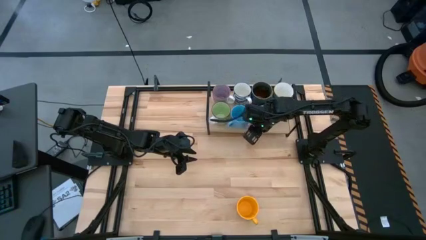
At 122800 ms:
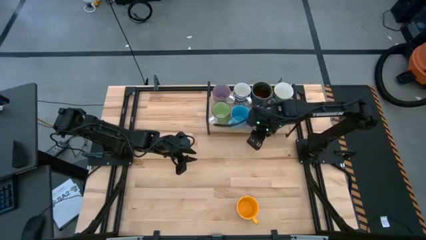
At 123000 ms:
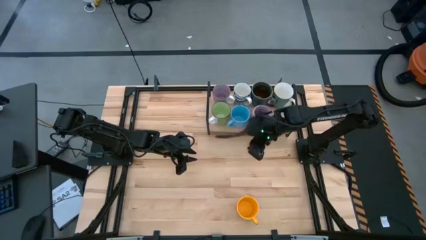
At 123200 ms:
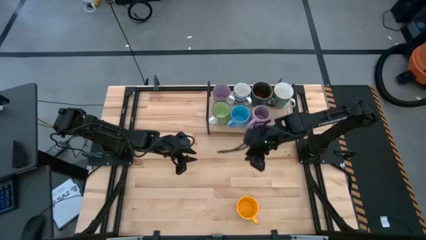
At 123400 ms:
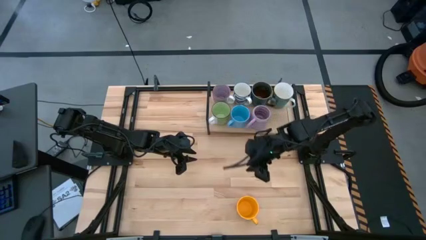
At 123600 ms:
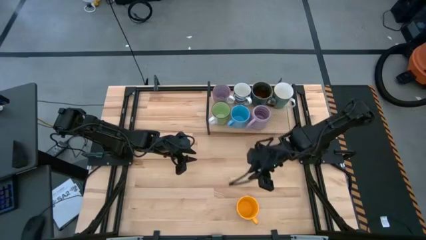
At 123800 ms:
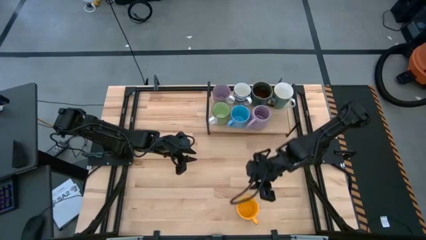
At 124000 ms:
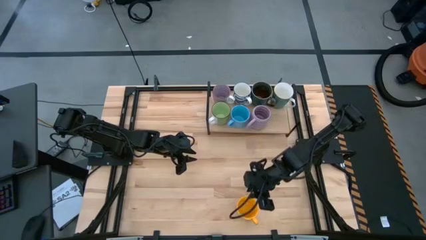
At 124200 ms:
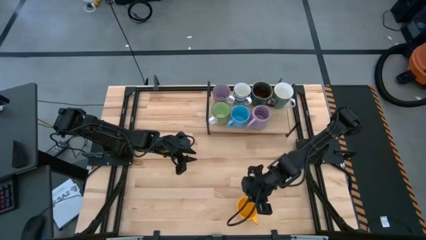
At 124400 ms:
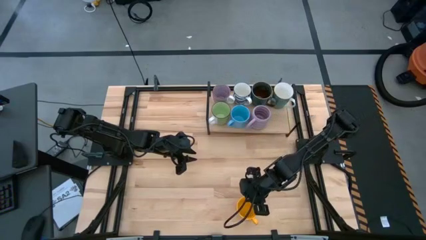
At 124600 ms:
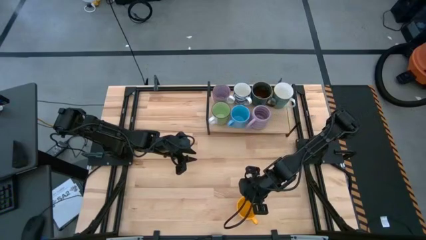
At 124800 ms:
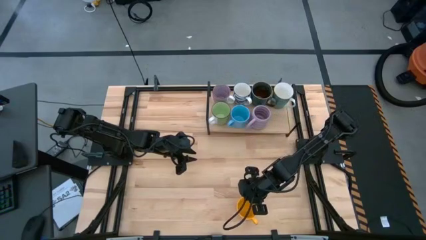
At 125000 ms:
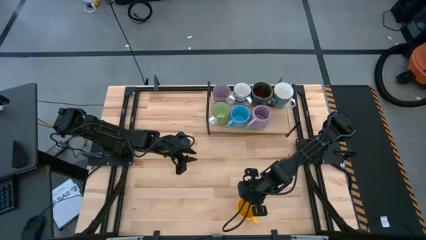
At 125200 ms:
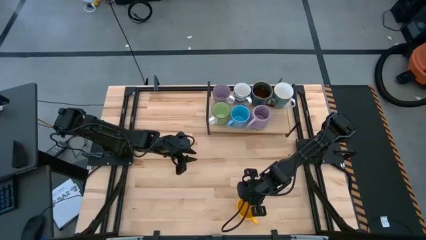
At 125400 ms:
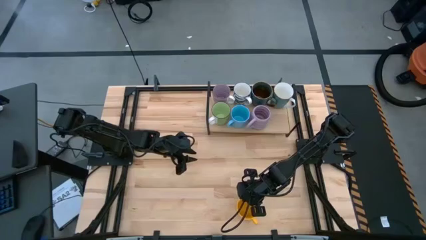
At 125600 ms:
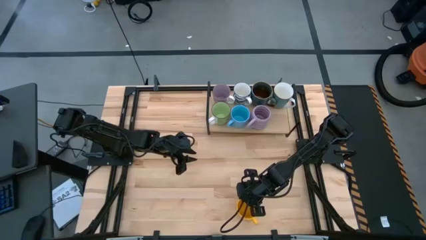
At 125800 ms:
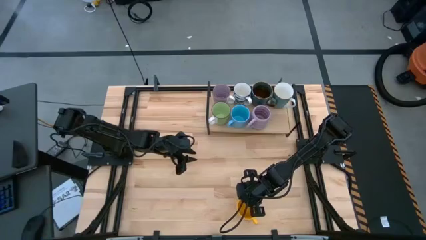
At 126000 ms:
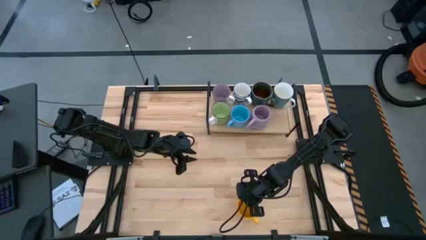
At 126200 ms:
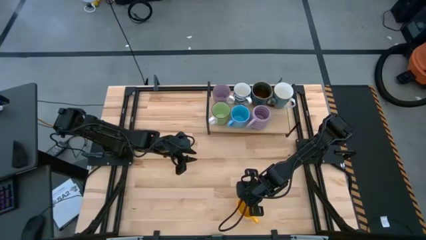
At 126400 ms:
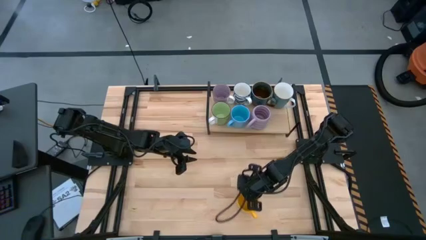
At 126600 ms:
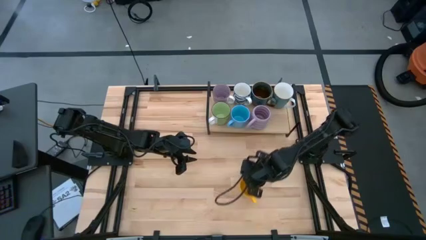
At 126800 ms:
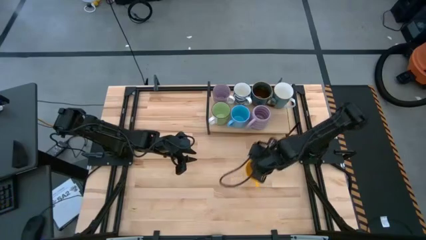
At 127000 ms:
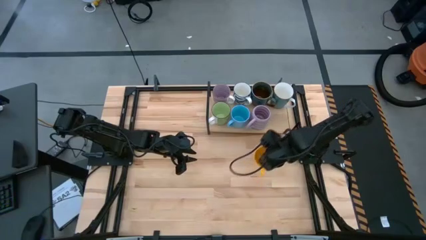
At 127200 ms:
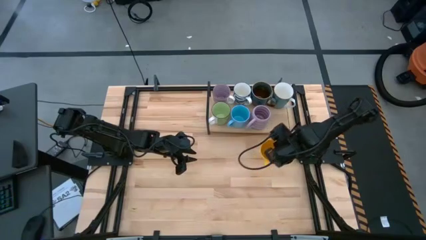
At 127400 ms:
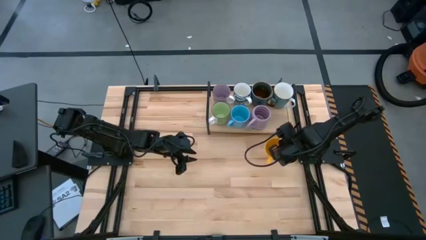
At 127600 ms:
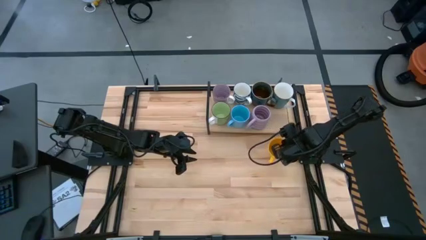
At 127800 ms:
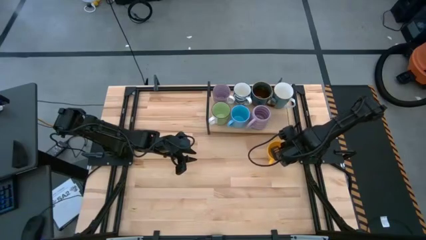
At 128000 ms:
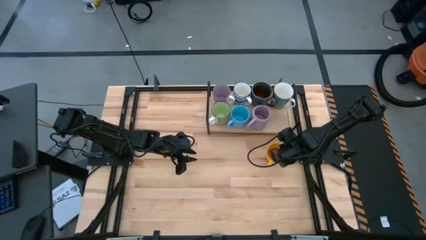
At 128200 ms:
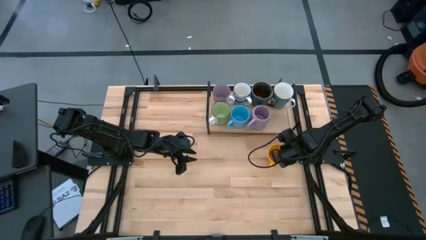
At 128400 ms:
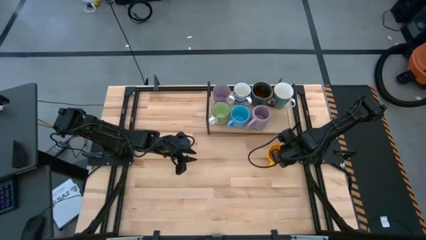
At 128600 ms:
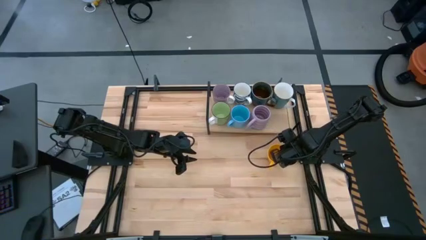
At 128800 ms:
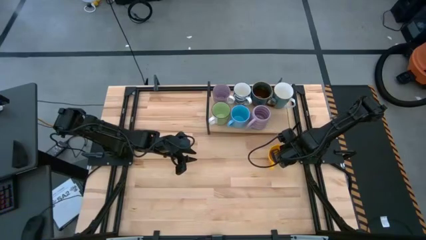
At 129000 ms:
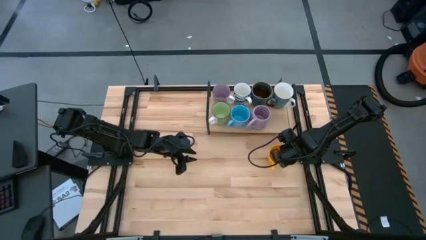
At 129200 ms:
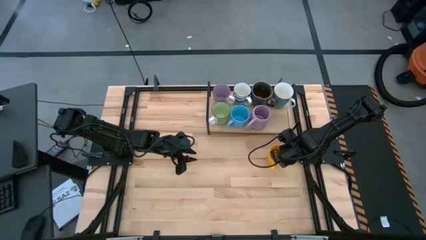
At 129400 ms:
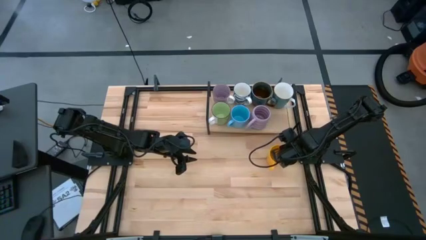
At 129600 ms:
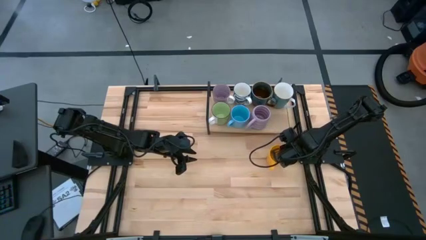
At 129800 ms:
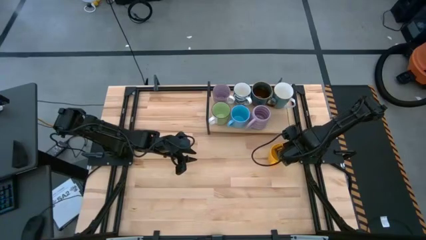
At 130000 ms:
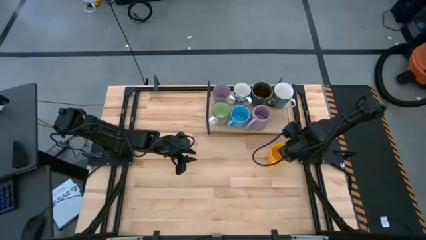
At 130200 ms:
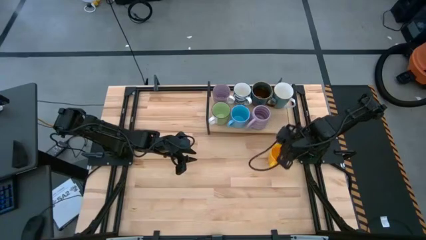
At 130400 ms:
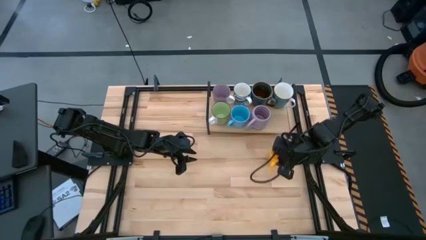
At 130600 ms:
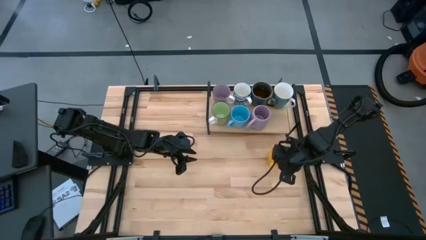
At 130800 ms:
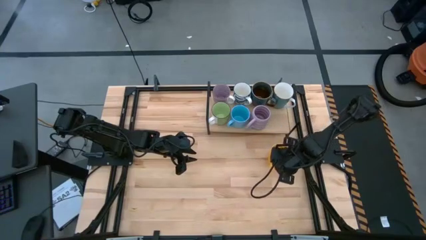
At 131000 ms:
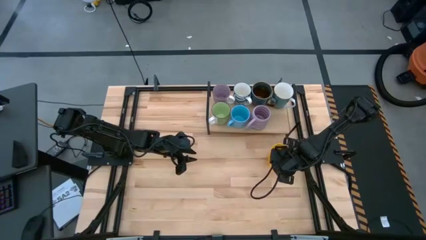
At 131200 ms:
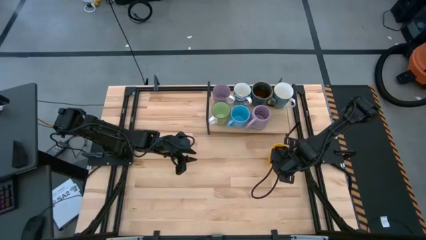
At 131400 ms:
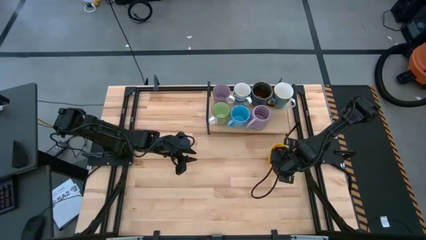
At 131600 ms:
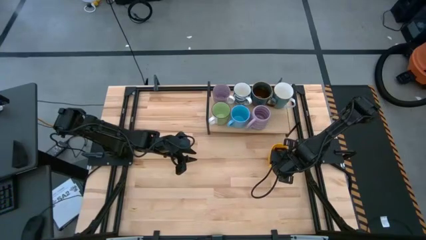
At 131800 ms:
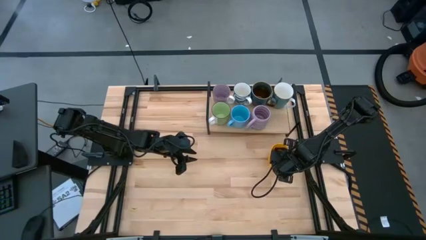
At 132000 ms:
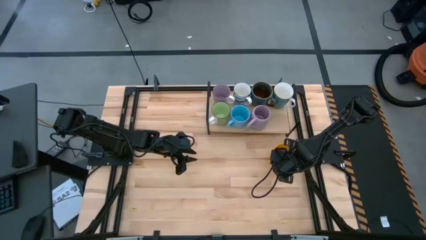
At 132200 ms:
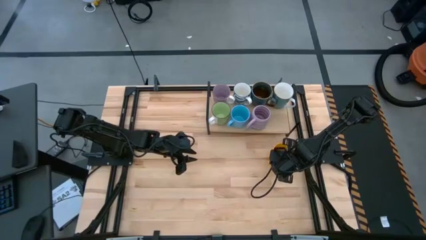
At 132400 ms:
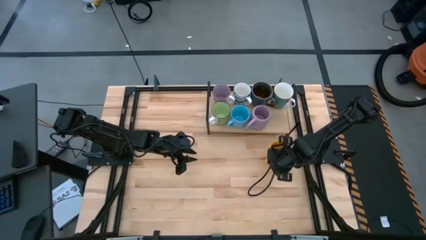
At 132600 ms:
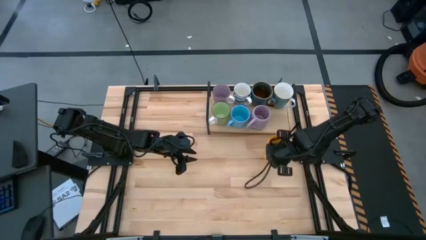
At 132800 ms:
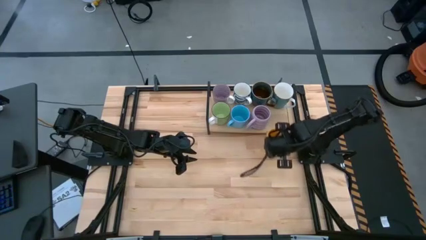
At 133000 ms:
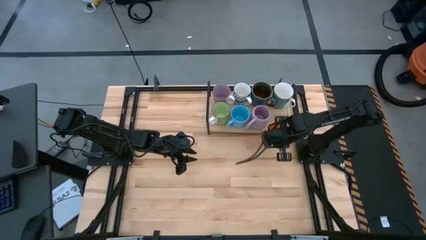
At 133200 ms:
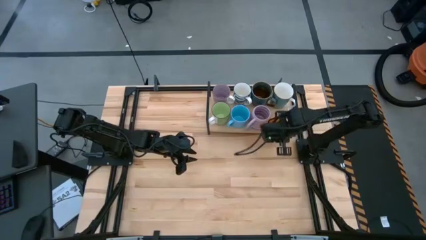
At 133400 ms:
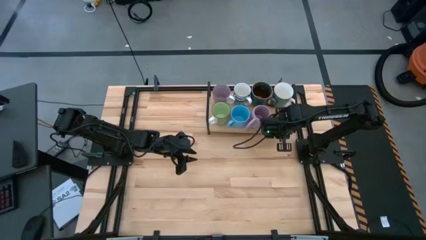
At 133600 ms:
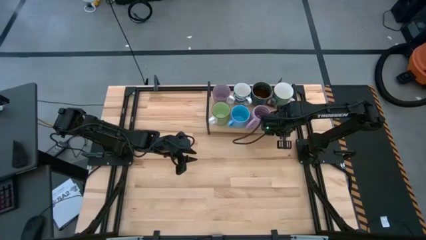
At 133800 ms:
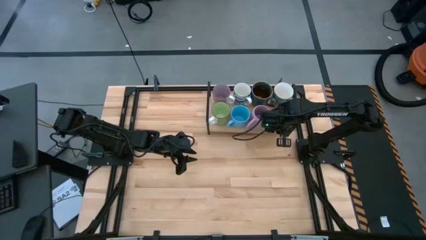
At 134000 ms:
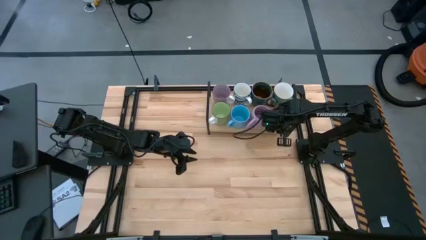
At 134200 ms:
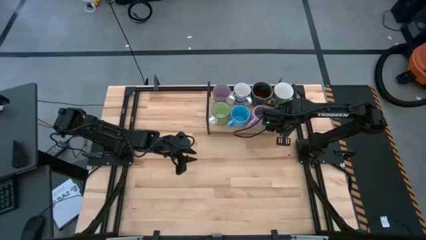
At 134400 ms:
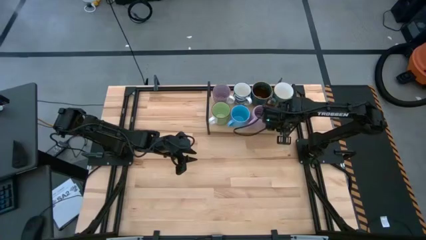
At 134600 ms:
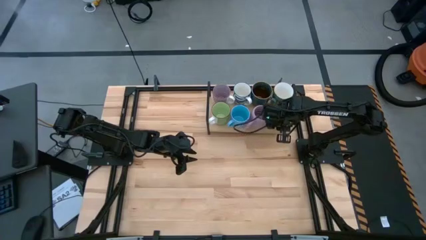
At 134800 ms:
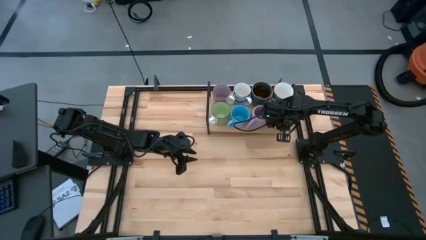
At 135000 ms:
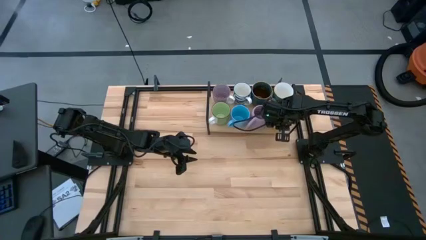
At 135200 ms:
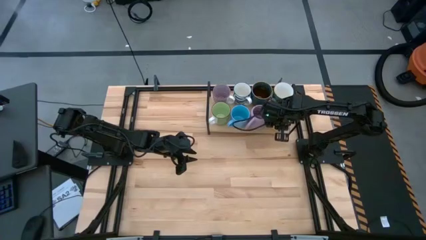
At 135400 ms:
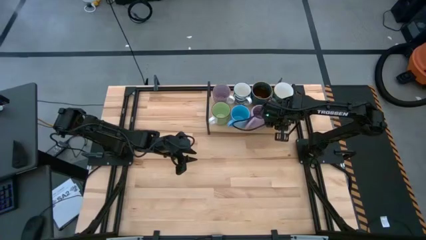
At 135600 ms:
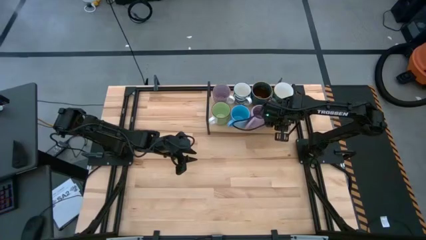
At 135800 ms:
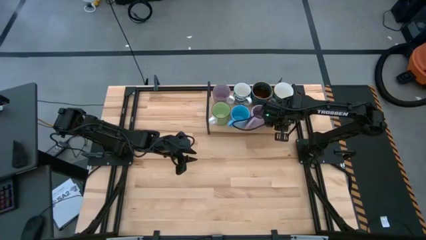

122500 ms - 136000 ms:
Task: Place coffee mugs
Put the yellow mug on the shelf

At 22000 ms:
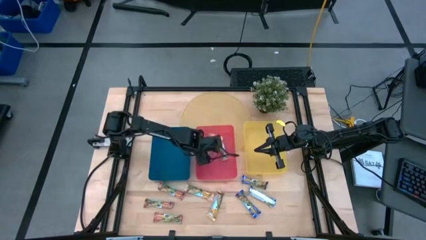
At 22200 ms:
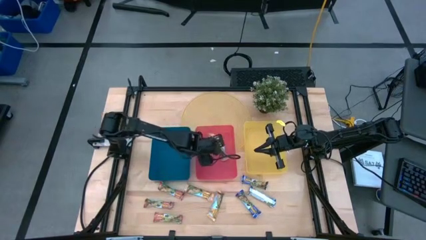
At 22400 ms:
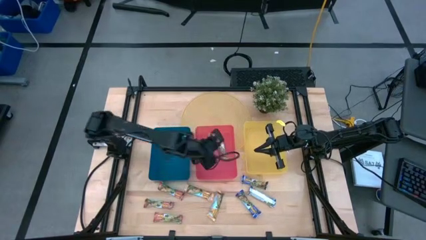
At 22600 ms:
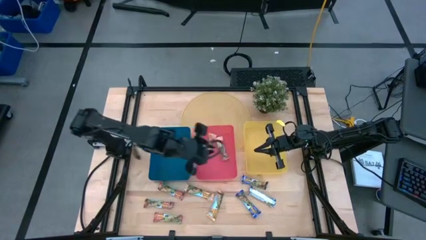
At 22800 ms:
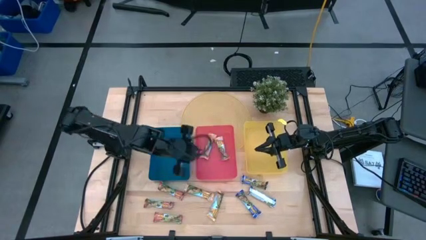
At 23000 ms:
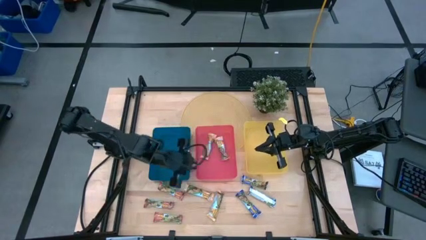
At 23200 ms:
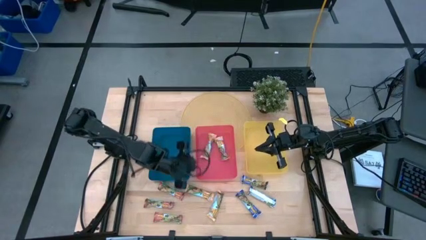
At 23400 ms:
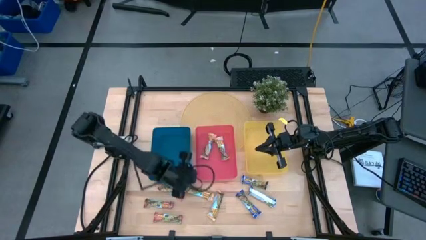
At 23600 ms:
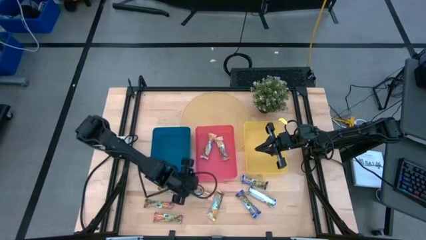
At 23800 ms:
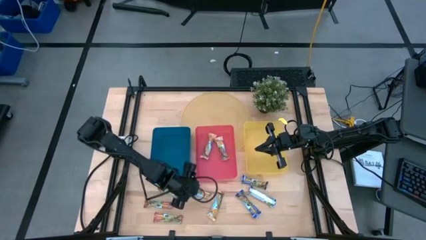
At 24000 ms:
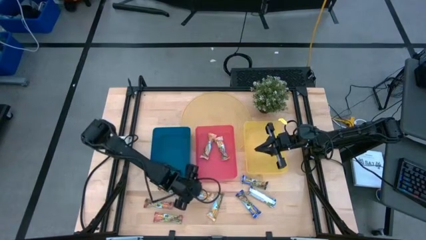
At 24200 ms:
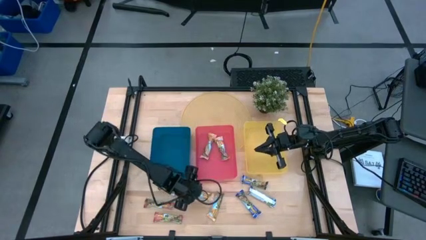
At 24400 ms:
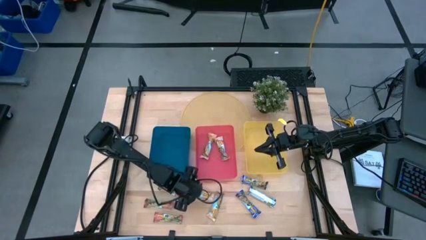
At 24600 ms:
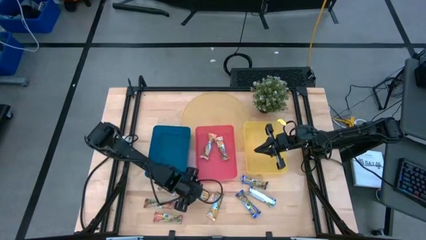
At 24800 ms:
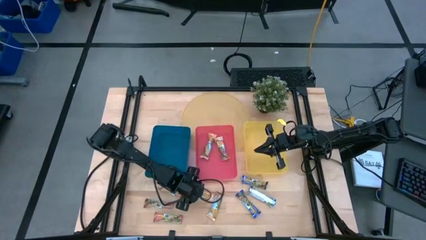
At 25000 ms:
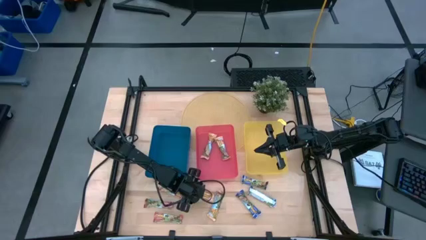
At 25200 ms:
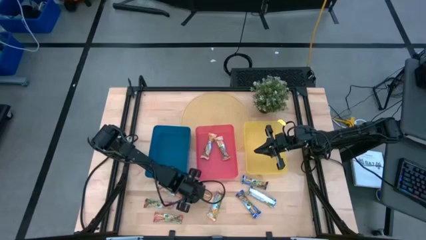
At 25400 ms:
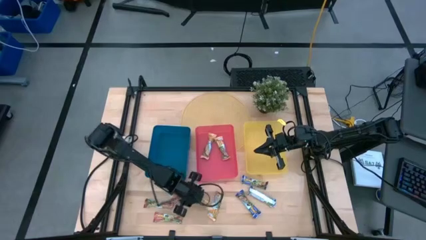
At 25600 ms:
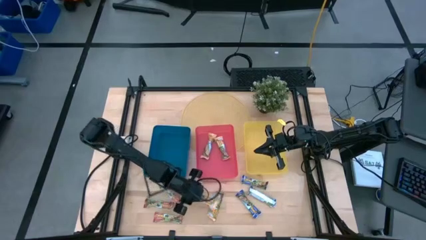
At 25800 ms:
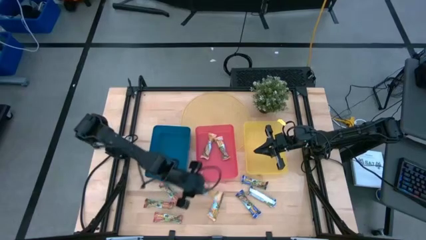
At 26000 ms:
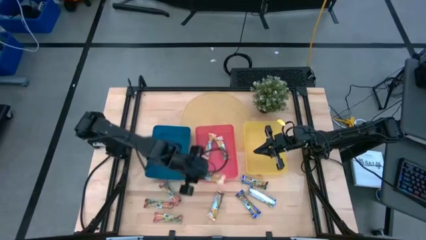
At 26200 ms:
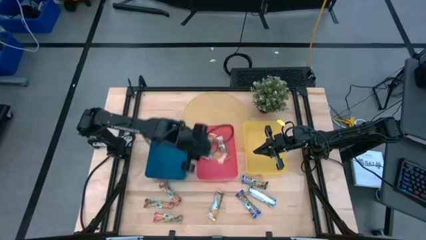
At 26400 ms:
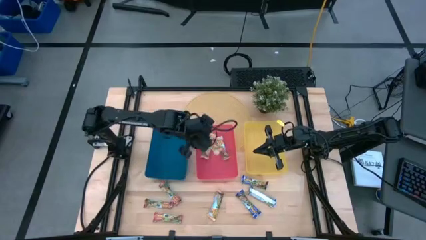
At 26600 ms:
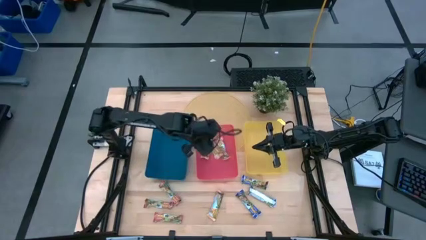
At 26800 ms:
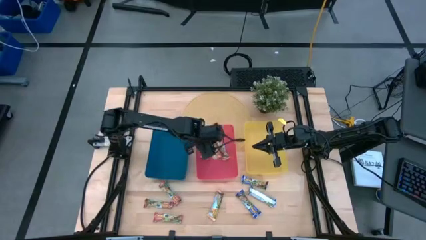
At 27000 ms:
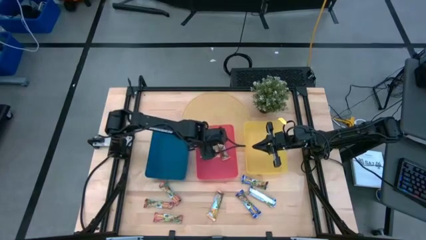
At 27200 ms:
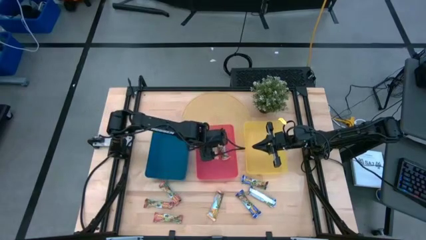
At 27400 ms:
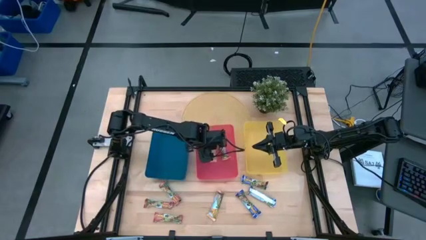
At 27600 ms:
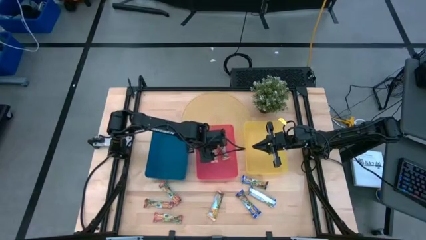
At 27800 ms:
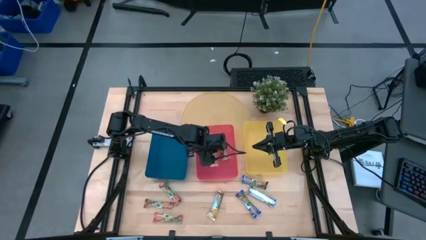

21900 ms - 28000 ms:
Task: Pick and place Granola Bars by type
Put the orange granola bar into the red bin
